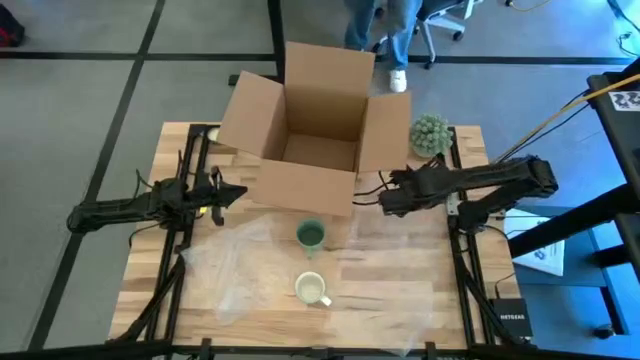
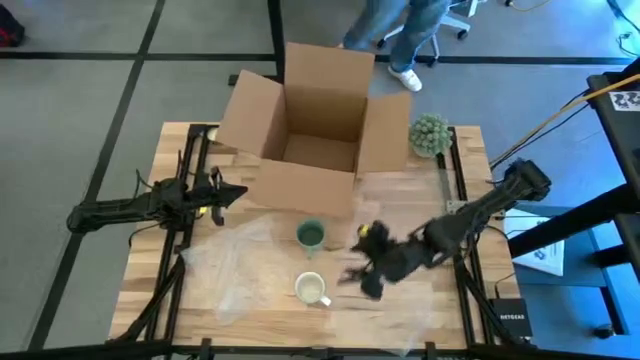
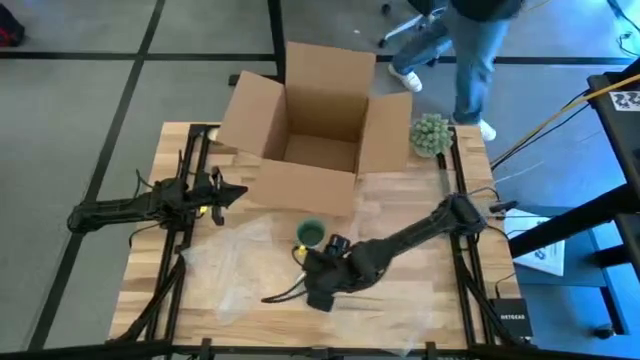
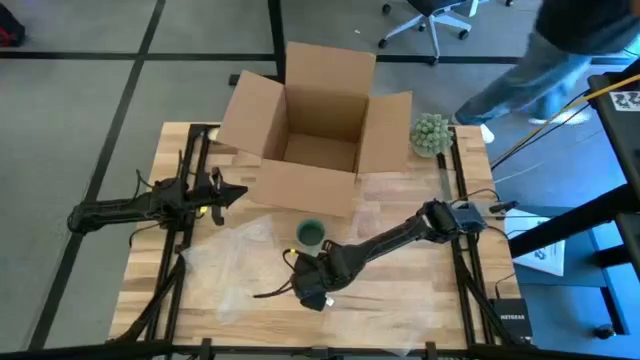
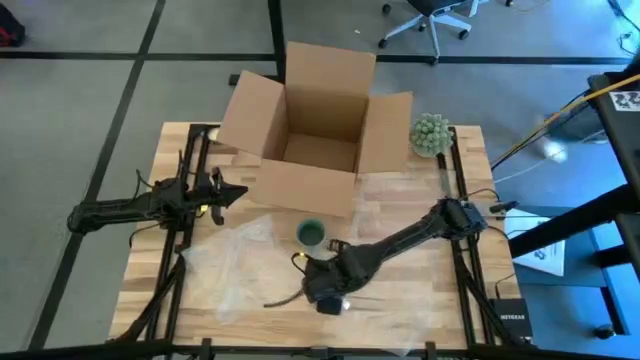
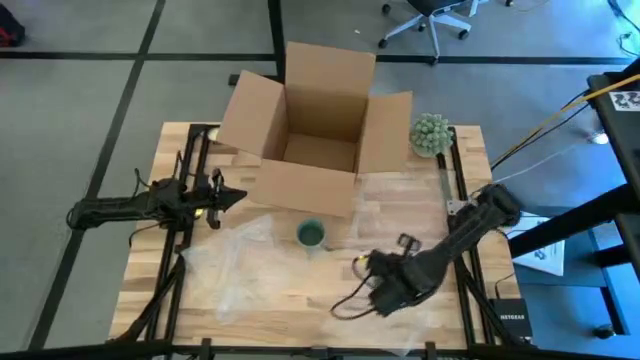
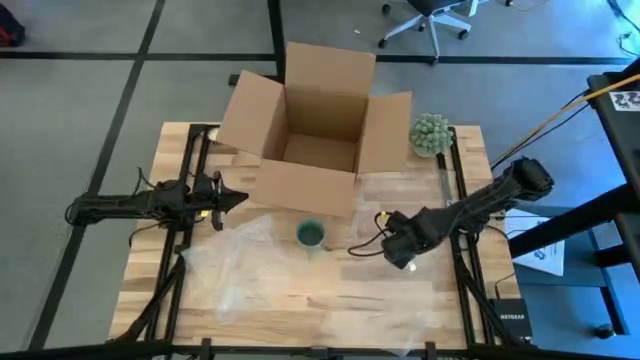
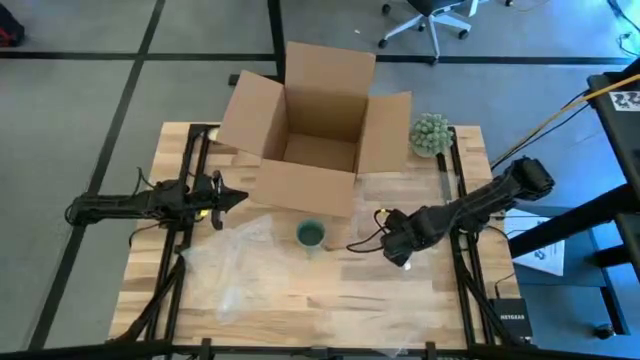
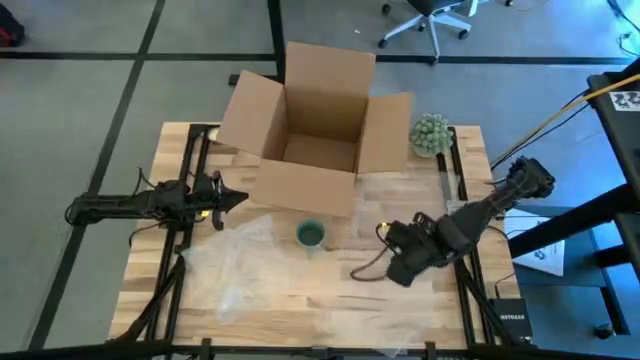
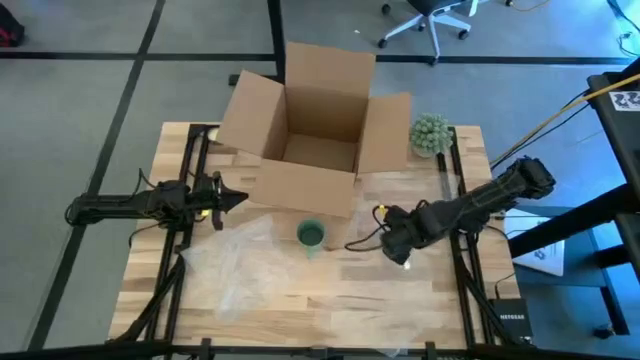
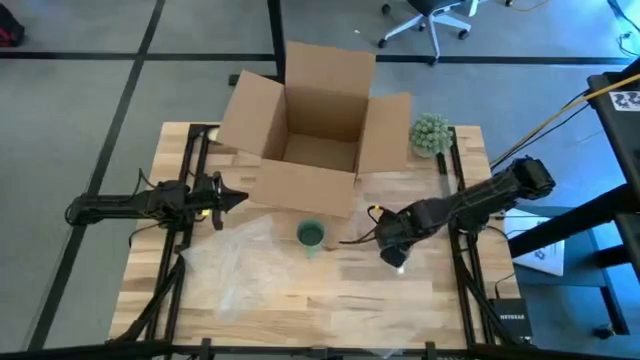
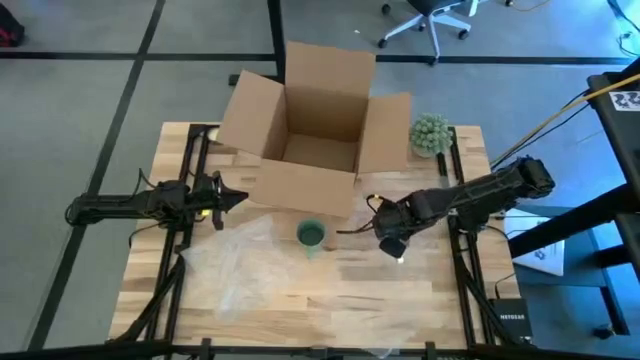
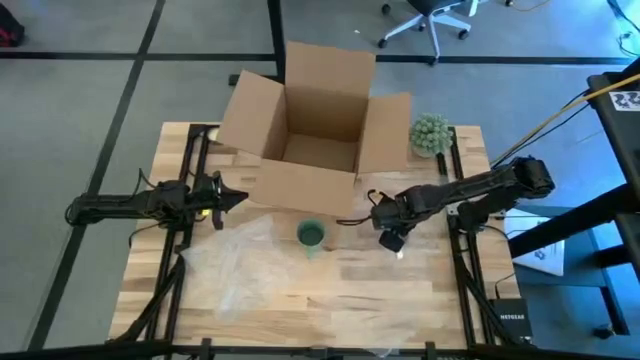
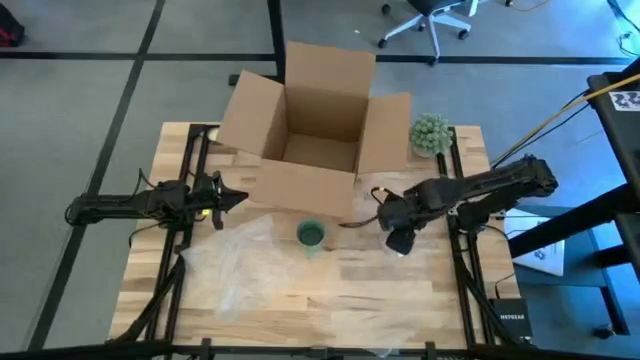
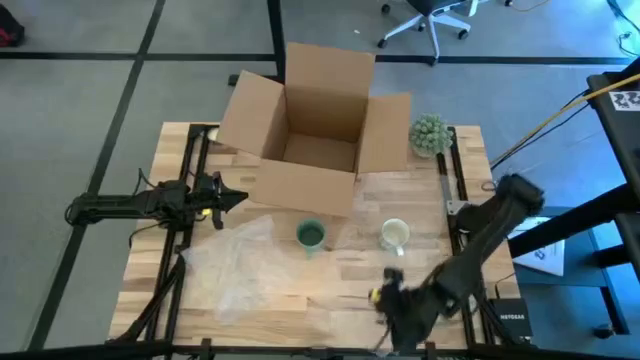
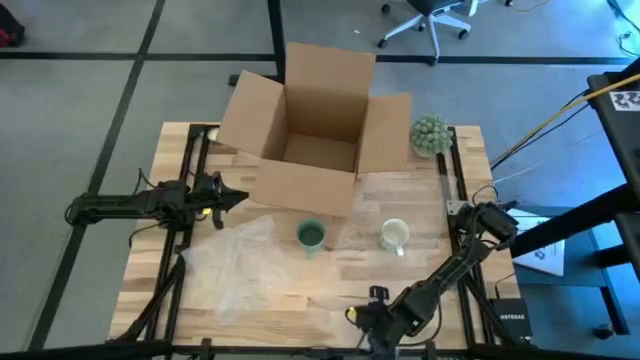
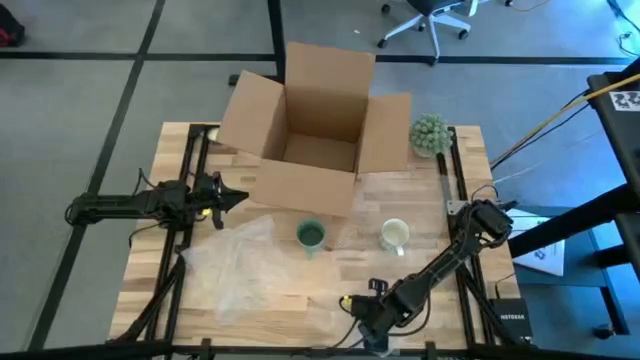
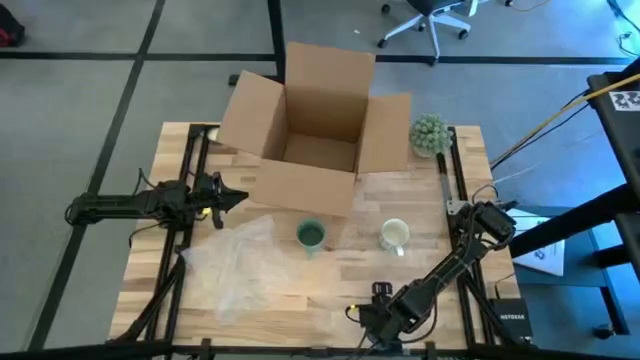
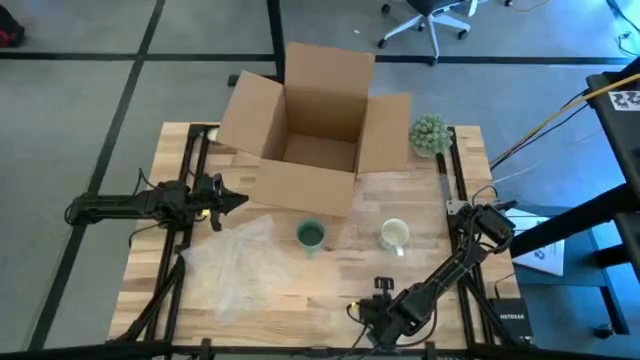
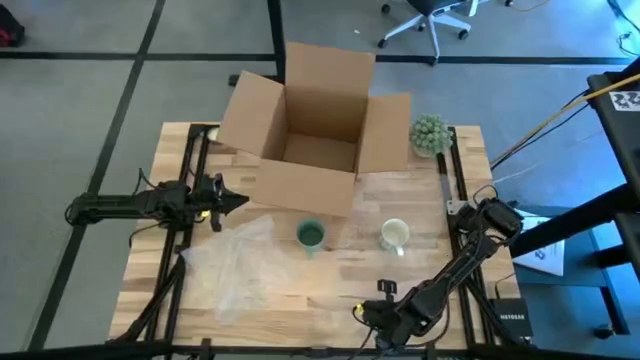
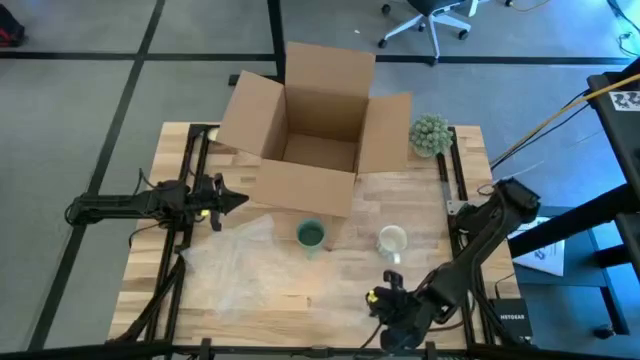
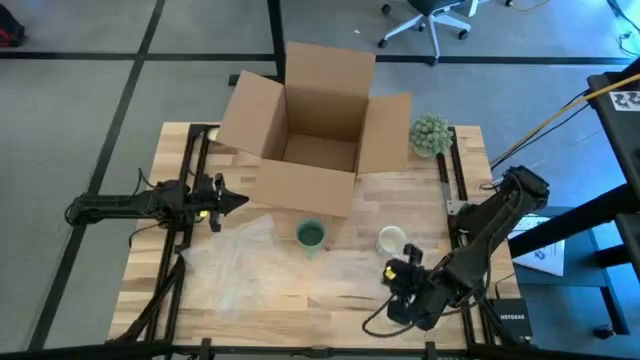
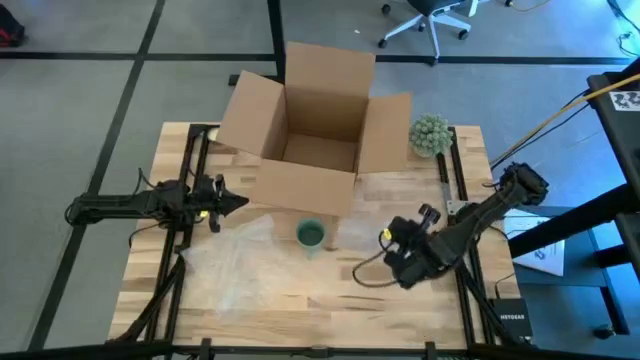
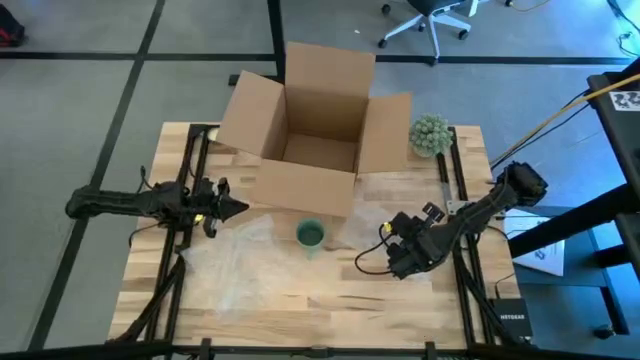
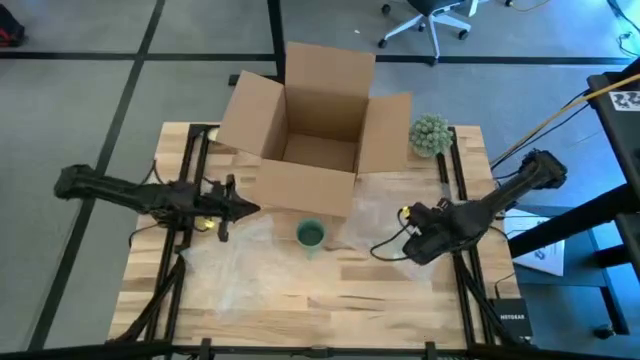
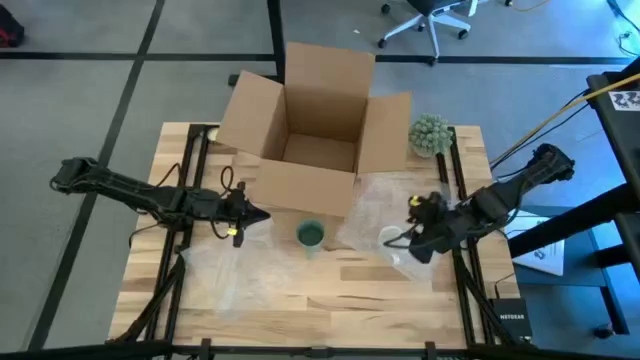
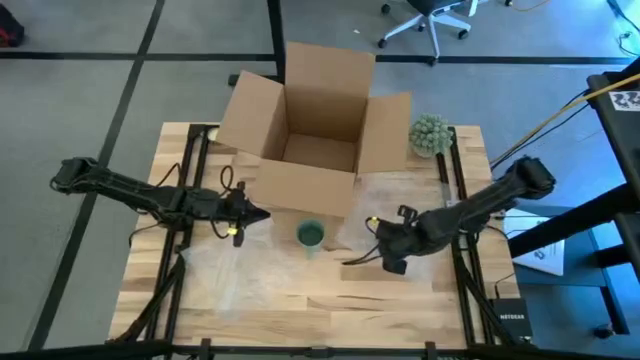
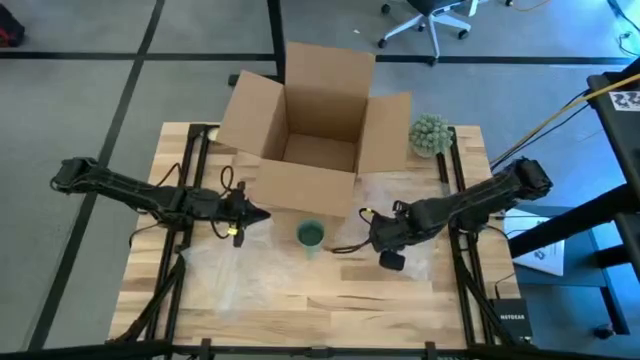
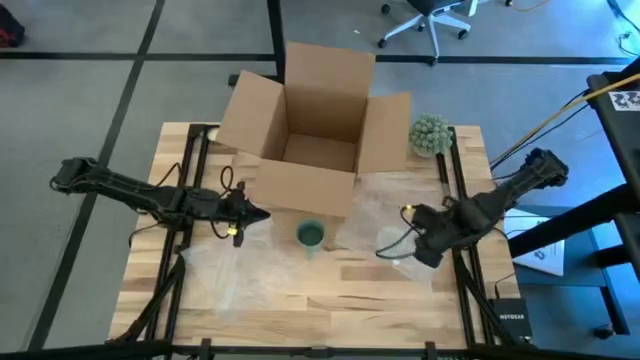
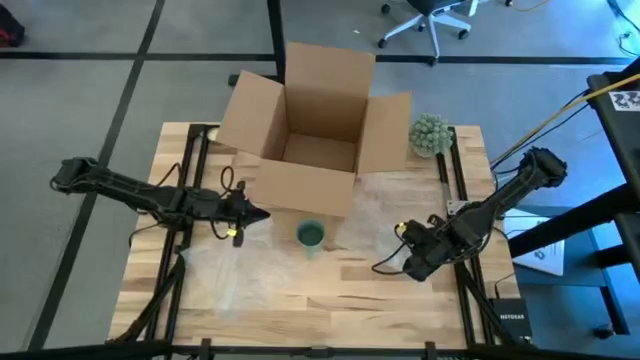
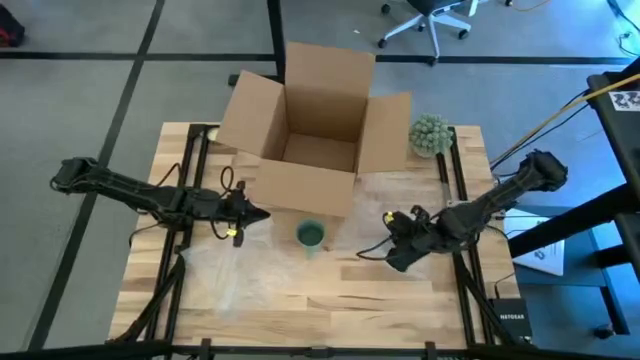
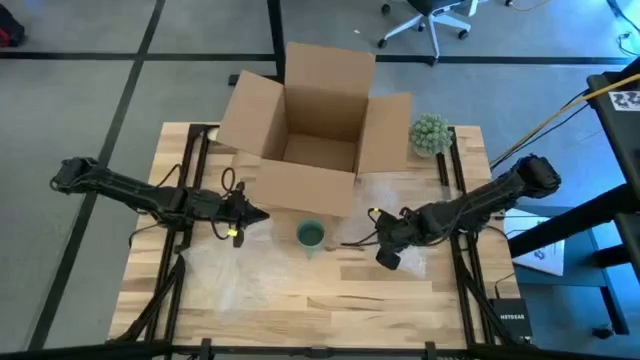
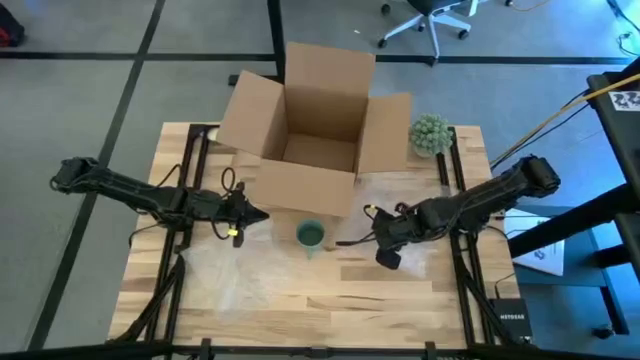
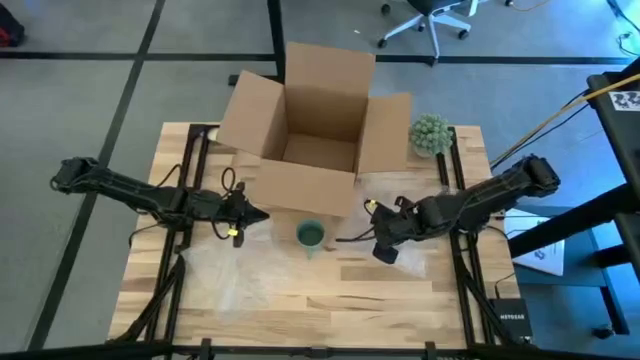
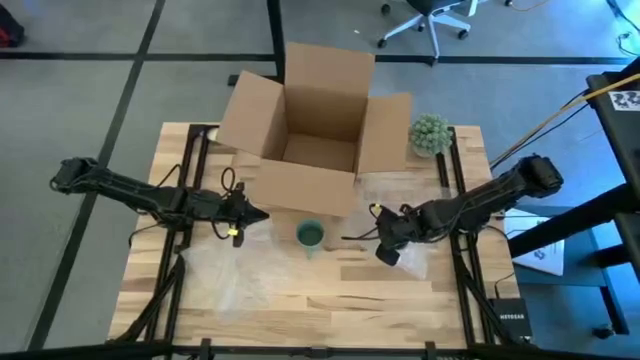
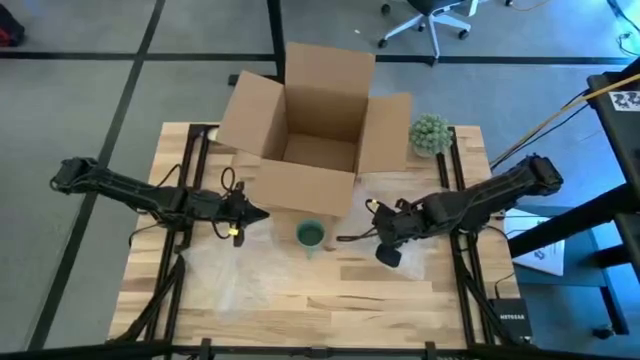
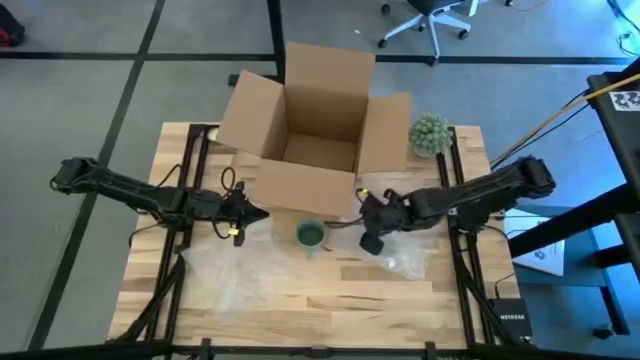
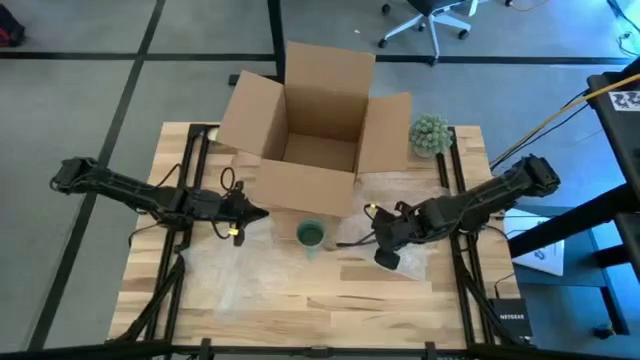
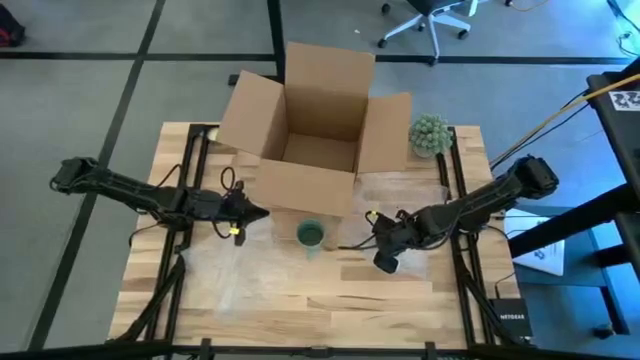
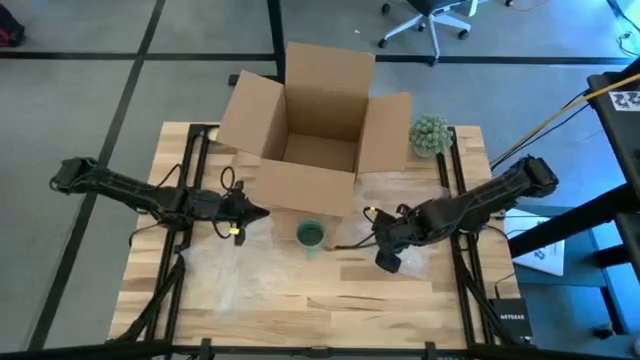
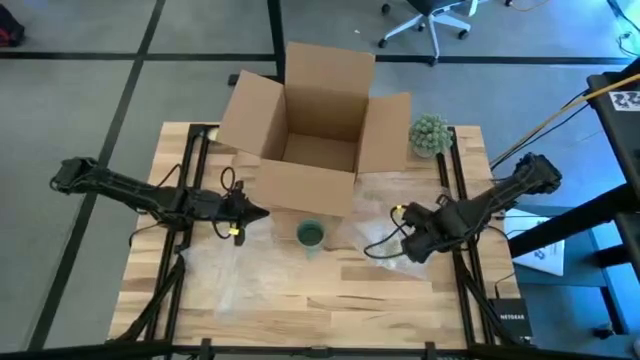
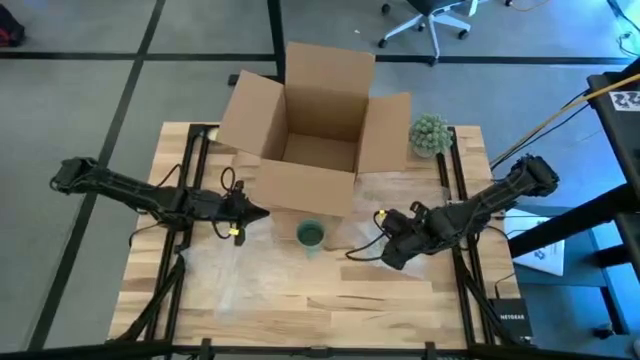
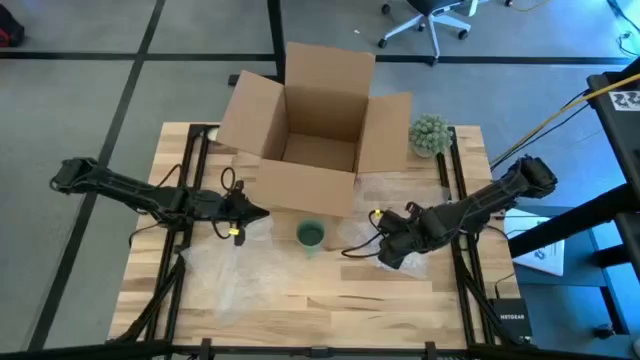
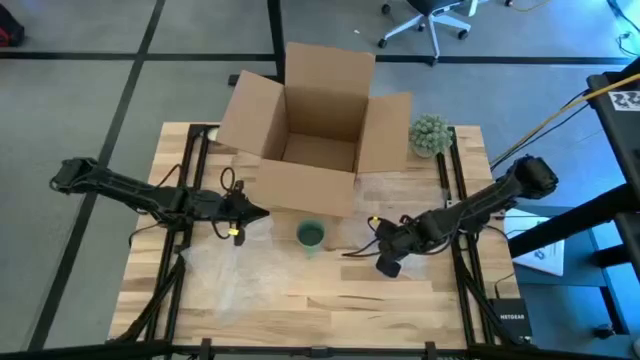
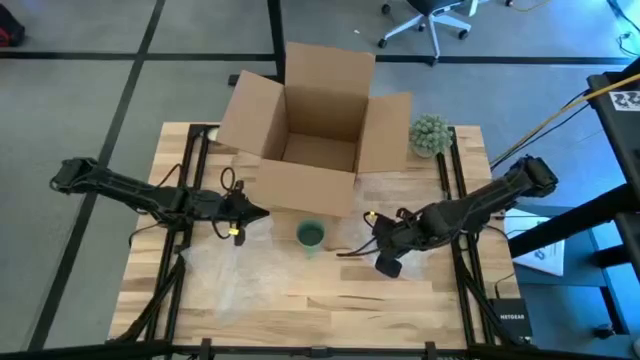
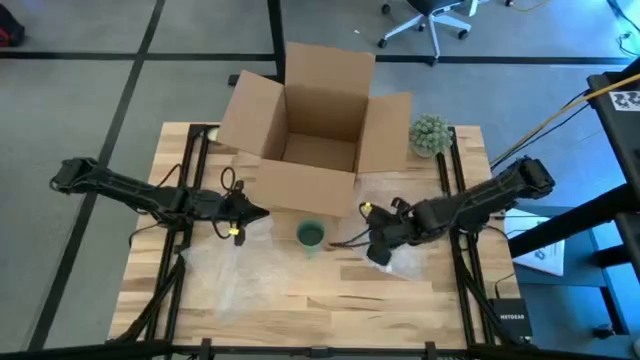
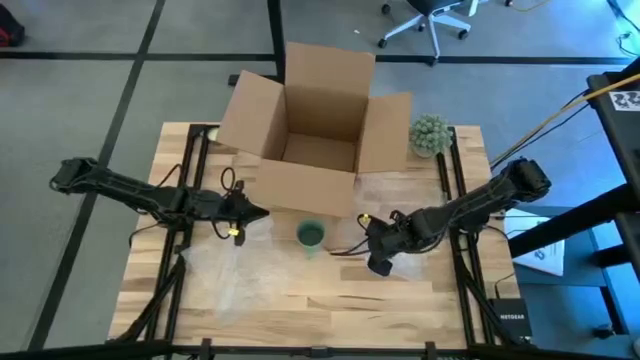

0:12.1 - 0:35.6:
Task: wrap mug
Wrap the bottom white blue floral mug glass
